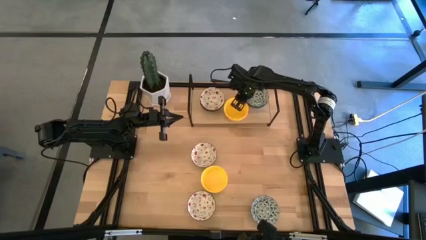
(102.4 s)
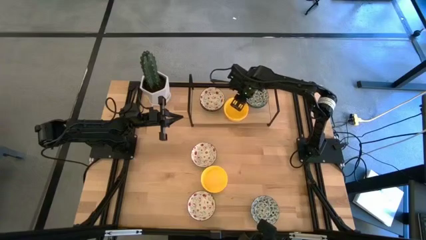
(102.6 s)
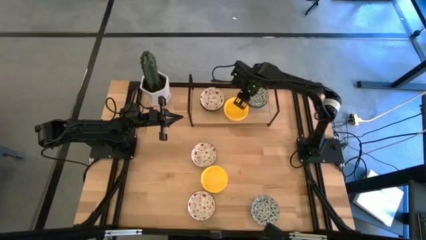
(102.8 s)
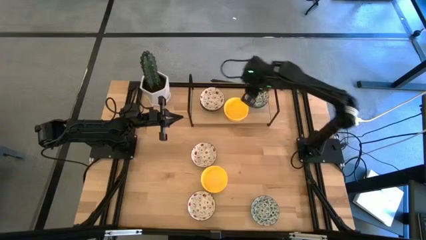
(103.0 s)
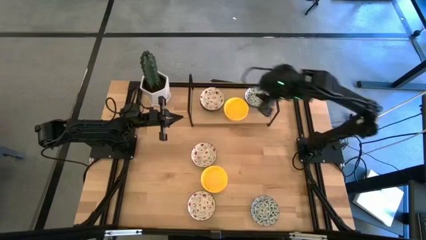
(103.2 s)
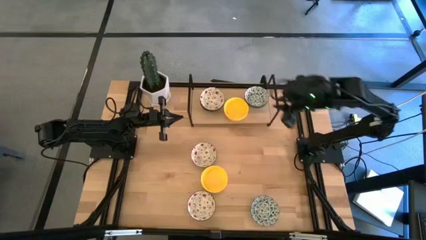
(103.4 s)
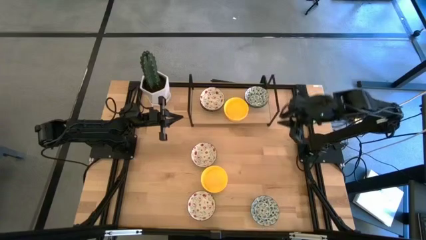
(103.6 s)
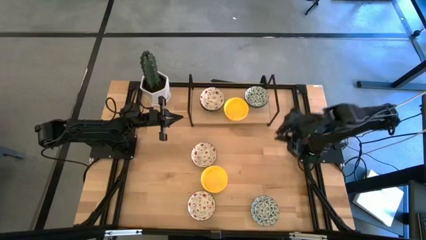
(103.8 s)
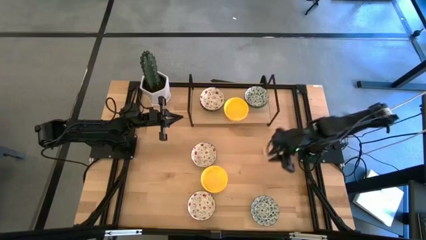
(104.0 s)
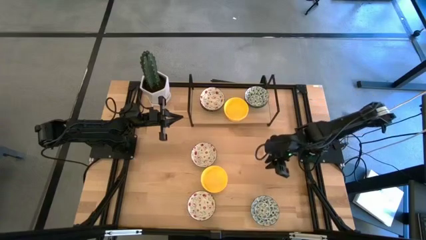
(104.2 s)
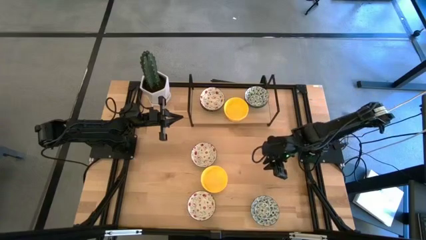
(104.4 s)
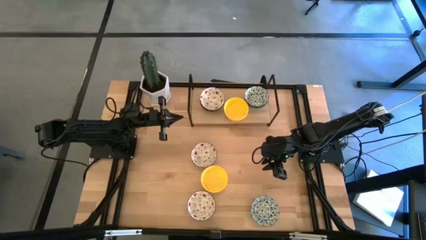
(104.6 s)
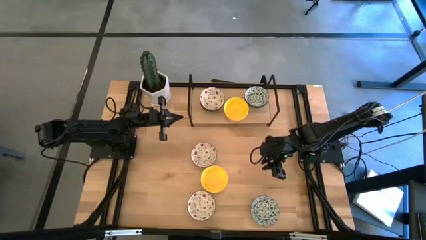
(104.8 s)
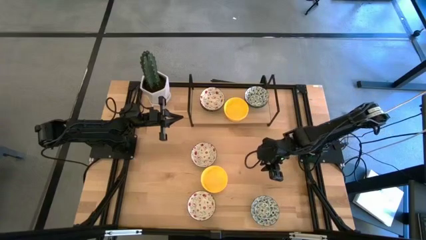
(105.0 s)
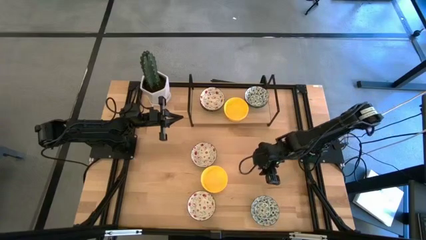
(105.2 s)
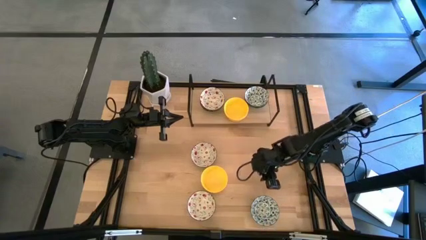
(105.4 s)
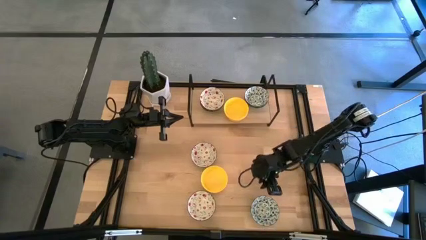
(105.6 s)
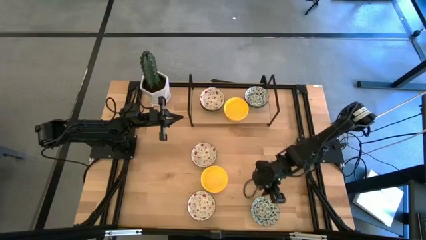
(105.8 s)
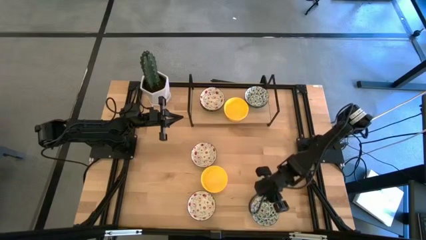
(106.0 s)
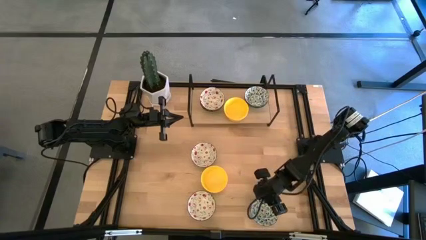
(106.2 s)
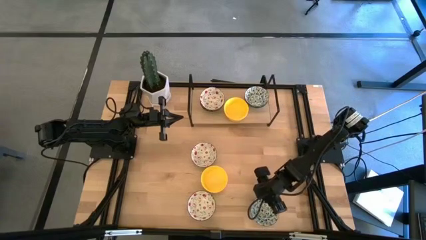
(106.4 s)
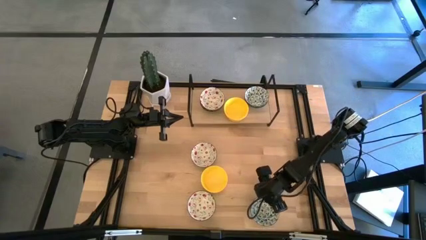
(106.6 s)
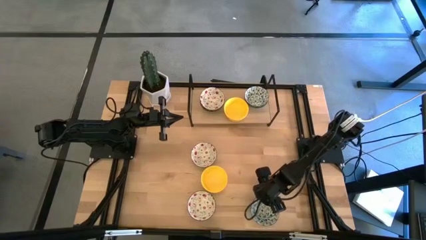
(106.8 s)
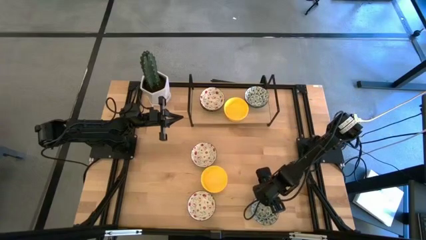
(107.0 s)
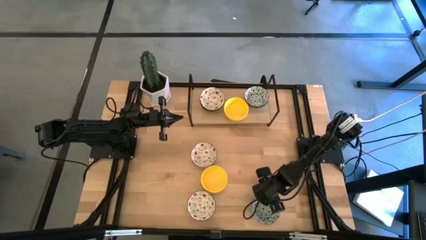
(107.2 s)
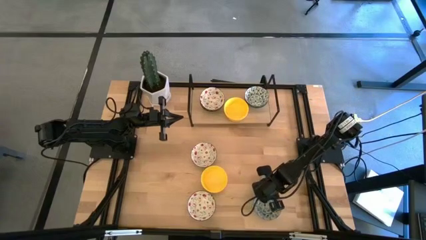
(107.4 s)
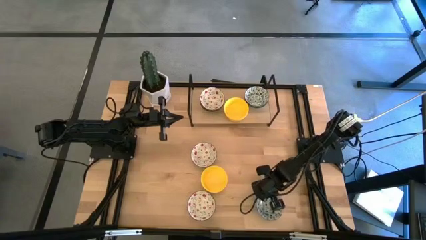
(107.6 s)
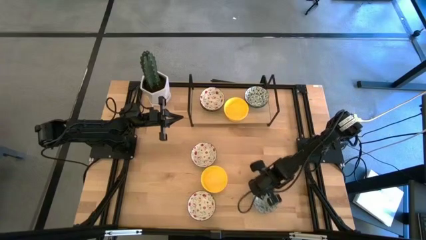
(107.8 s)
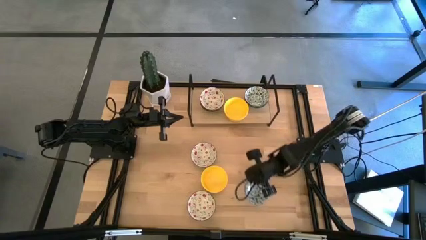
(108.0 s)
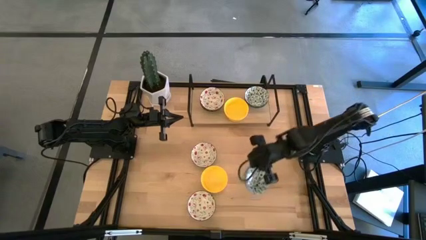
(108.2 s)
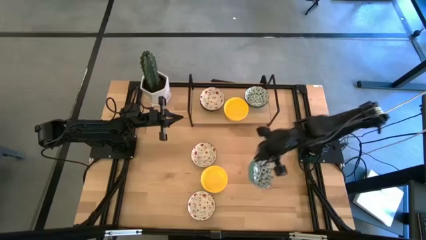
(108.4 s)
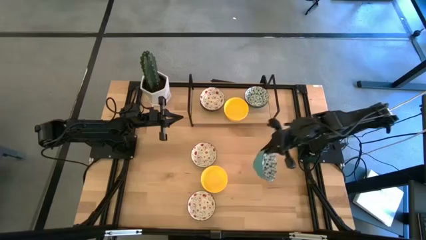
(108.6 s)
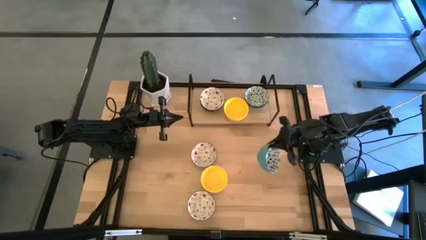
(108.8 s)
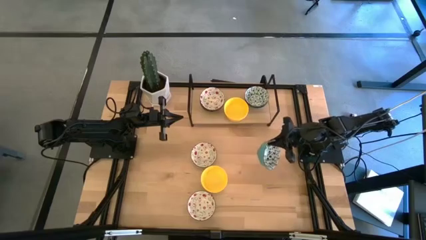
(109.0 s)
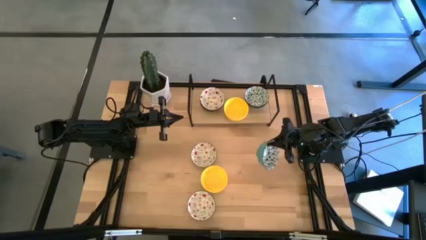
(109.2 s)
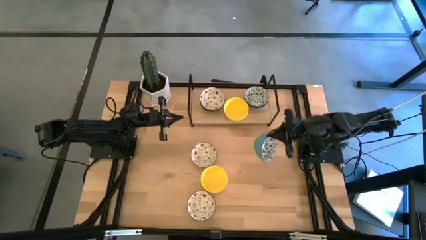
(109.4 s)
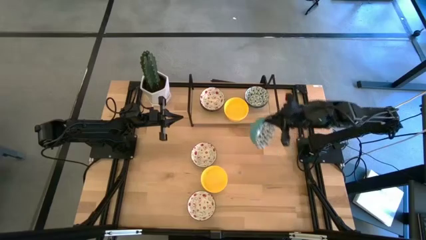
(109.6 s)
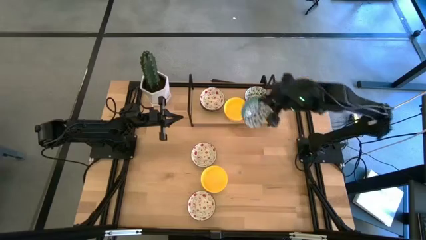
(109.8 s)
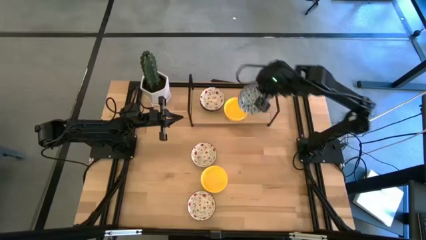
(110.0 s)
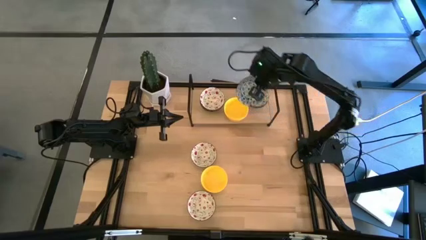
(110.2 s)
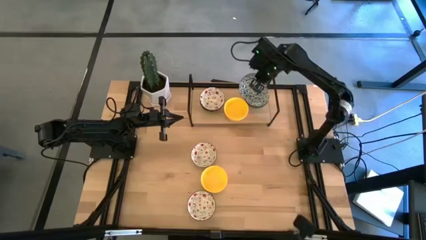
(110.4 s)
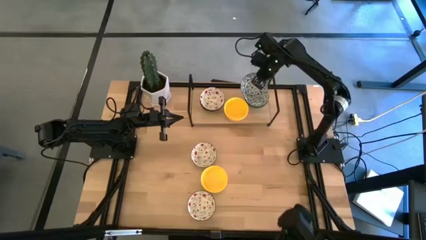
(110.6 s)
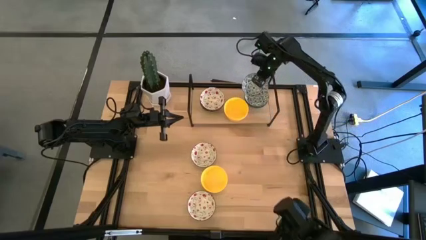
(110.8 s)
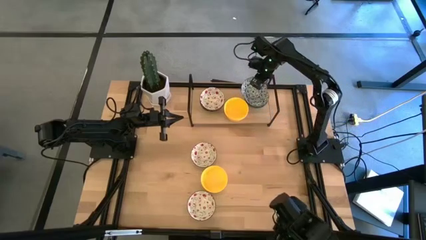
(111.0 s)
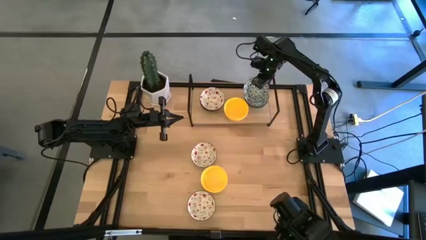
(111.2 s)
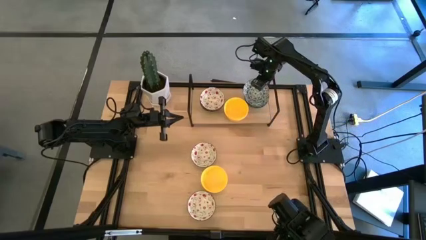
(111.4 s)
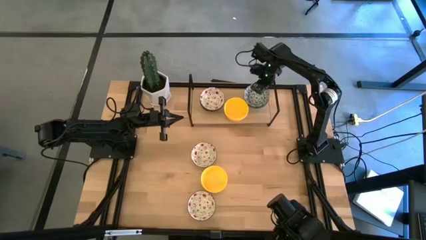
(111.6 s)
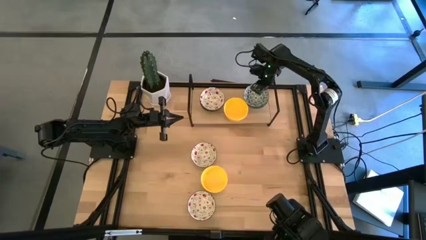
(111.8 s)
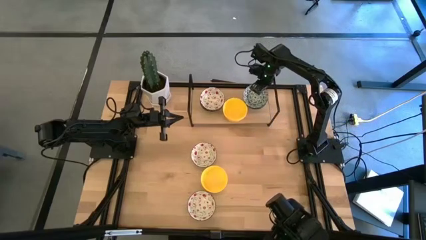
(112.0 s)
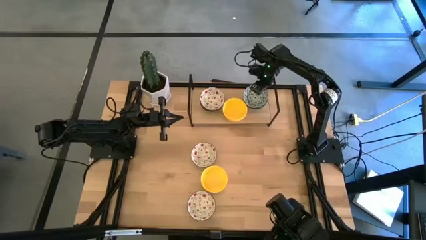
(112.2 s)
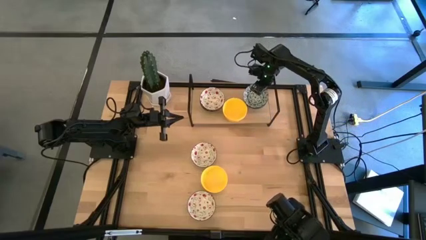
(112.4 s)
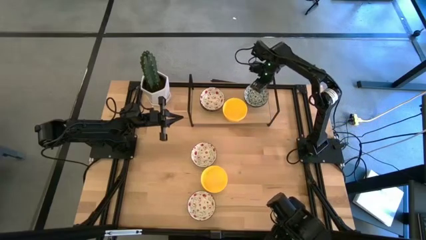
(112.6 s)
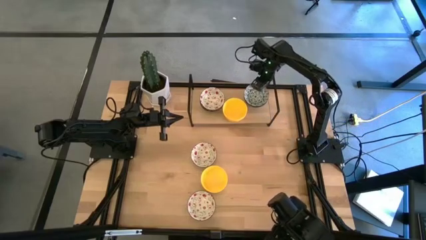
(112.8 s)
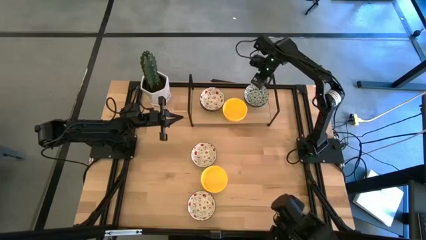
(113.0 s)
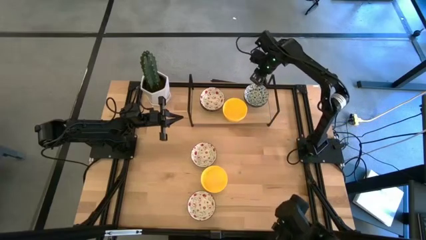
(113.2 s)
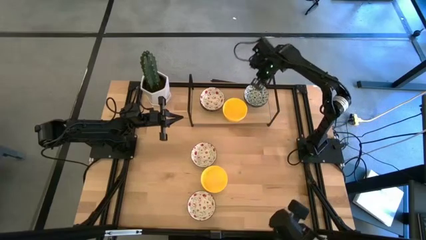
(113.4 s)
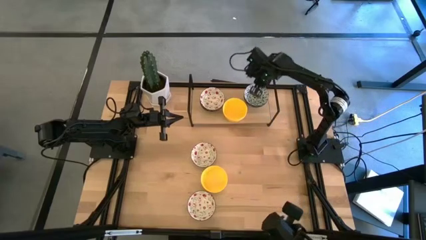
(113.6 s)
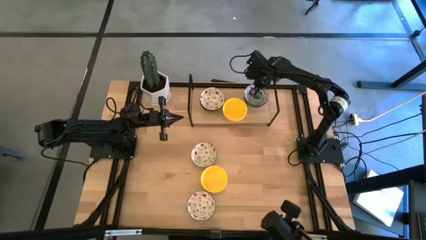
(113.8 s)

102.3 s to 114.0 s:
Task: Pick & Place Mini bowls
Stack the blue bowl on top of the blue bowl on the shelf
